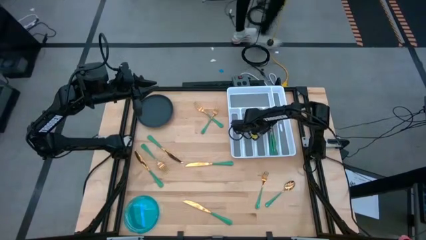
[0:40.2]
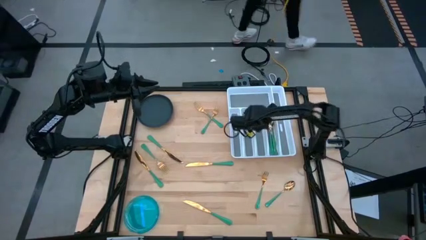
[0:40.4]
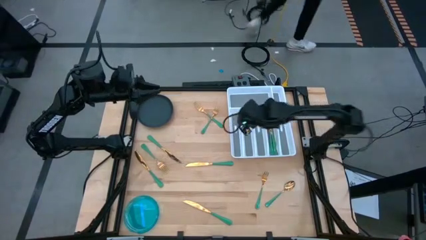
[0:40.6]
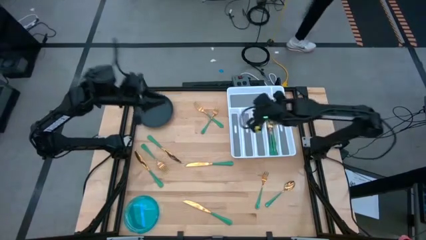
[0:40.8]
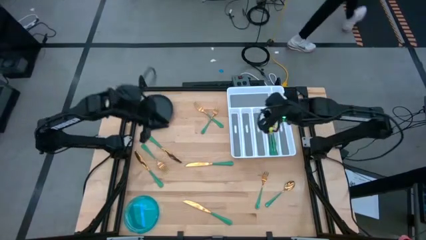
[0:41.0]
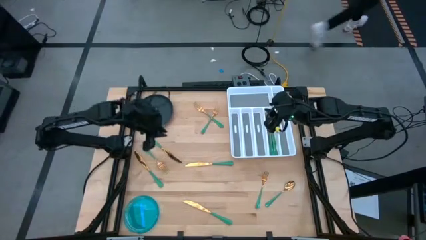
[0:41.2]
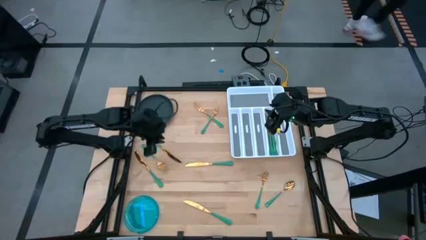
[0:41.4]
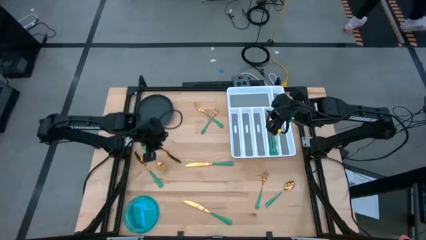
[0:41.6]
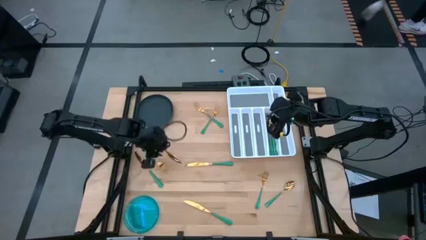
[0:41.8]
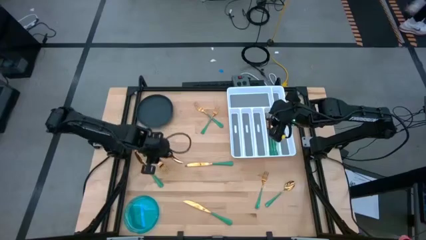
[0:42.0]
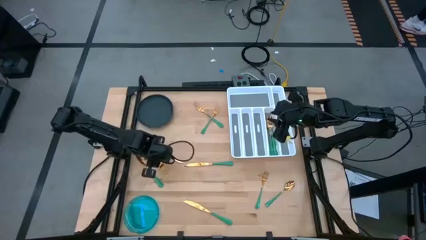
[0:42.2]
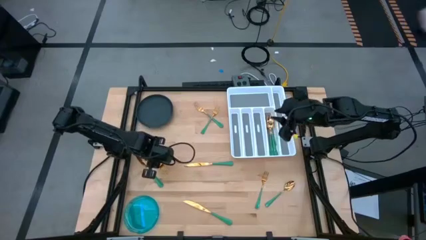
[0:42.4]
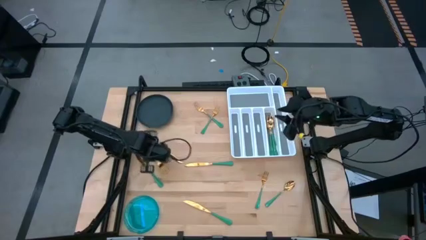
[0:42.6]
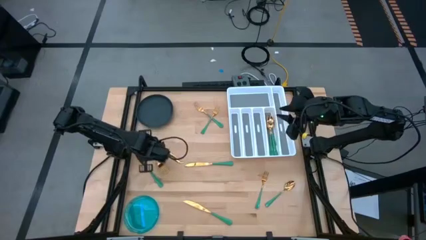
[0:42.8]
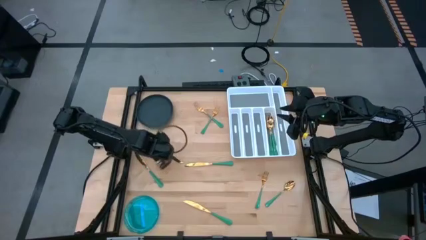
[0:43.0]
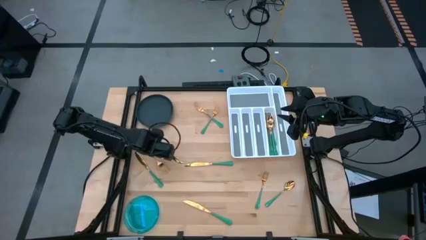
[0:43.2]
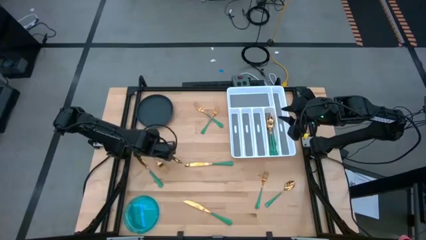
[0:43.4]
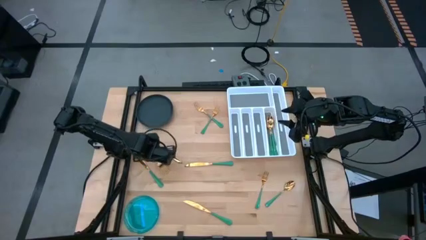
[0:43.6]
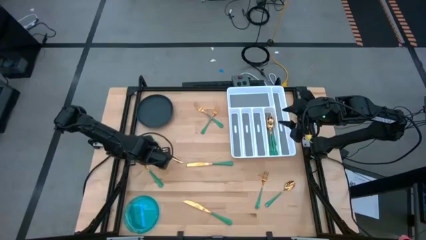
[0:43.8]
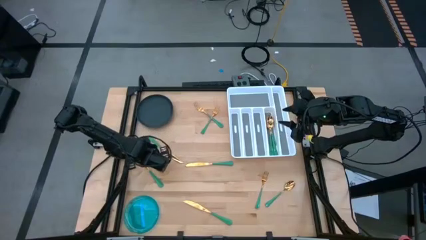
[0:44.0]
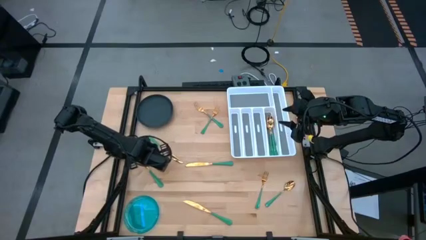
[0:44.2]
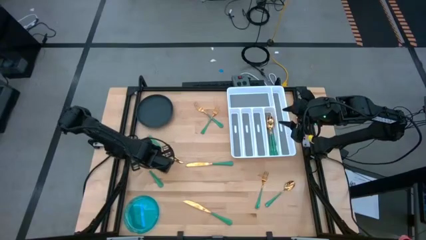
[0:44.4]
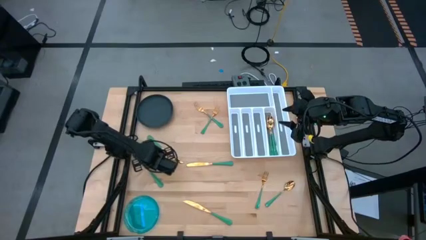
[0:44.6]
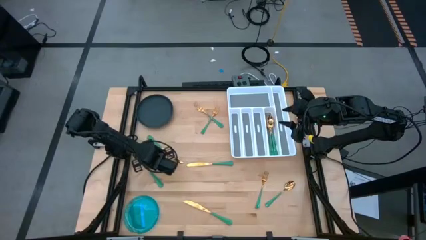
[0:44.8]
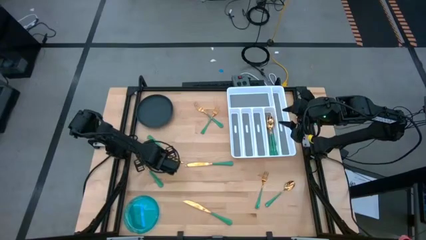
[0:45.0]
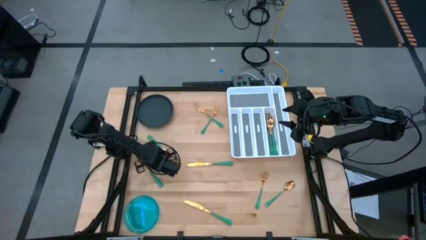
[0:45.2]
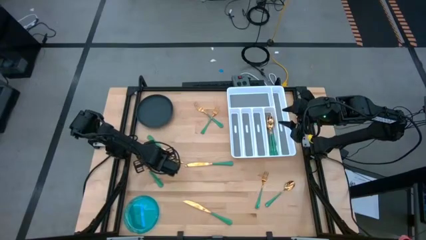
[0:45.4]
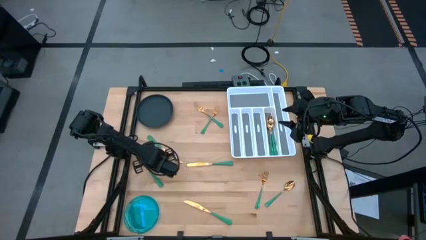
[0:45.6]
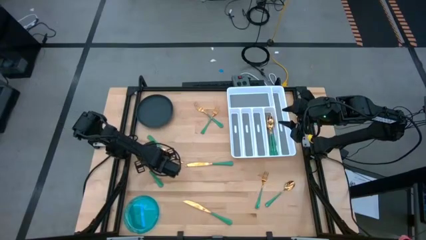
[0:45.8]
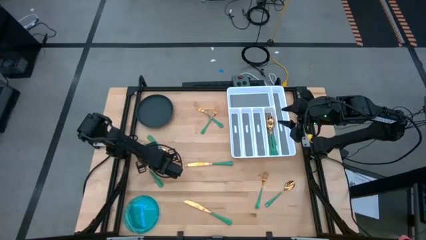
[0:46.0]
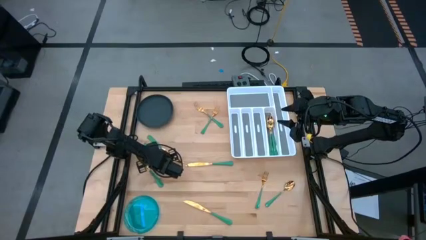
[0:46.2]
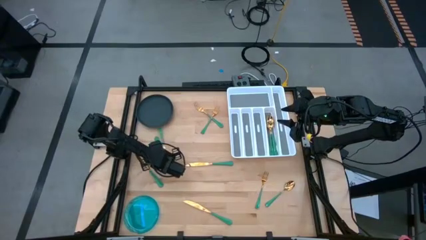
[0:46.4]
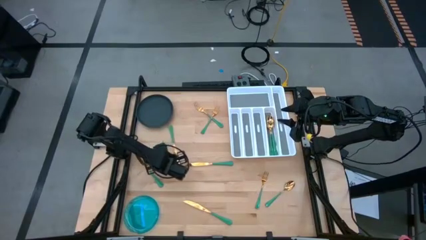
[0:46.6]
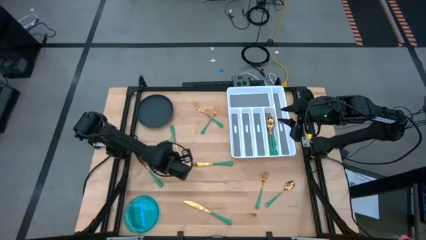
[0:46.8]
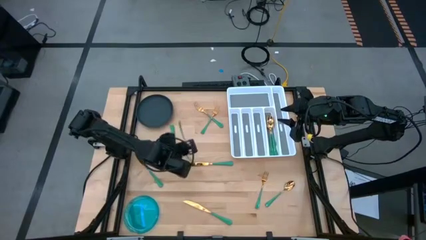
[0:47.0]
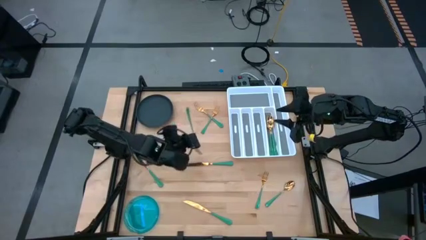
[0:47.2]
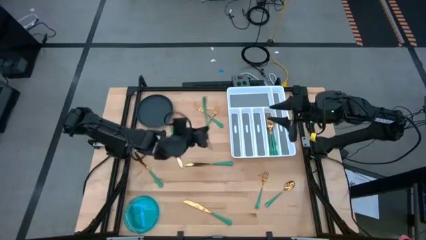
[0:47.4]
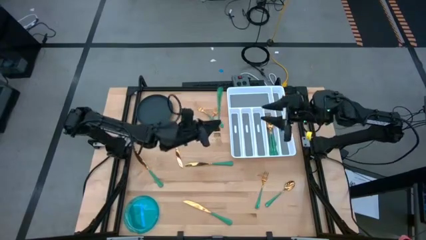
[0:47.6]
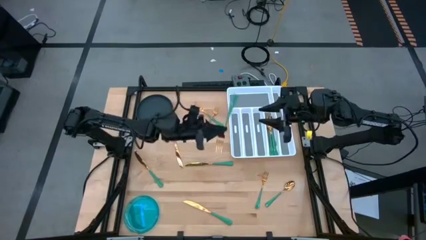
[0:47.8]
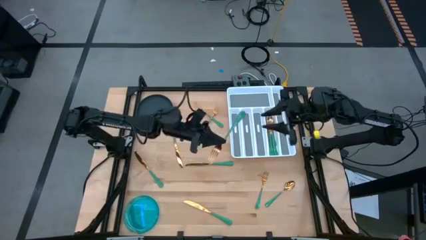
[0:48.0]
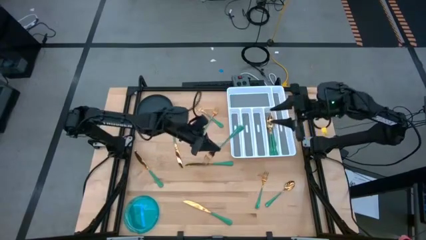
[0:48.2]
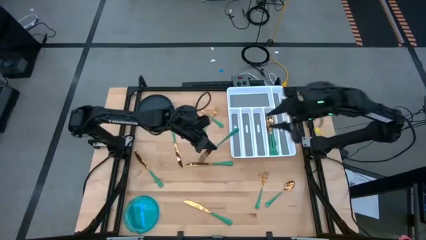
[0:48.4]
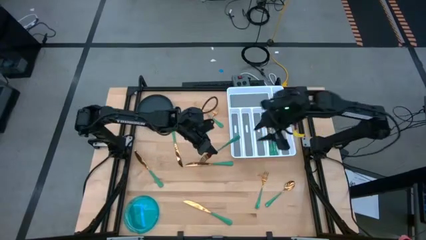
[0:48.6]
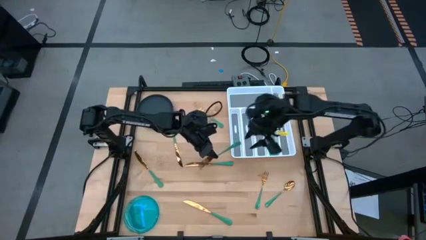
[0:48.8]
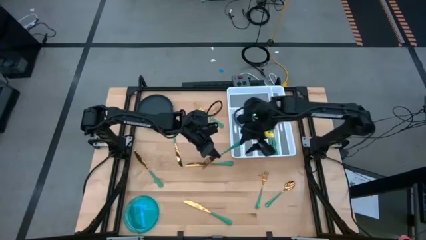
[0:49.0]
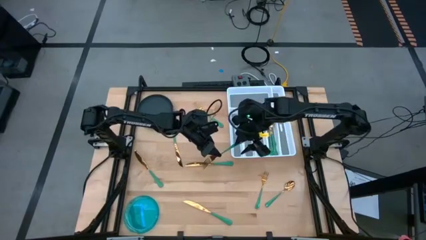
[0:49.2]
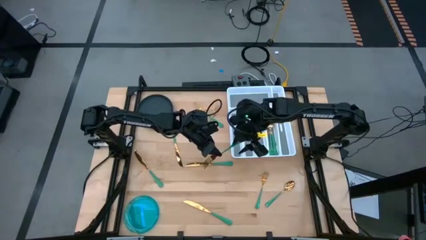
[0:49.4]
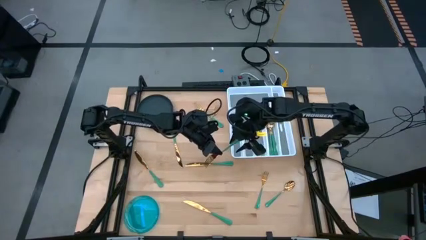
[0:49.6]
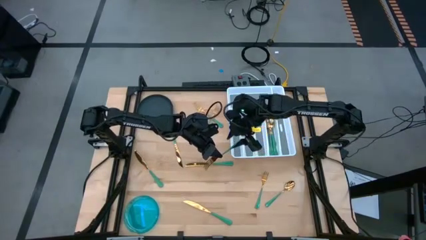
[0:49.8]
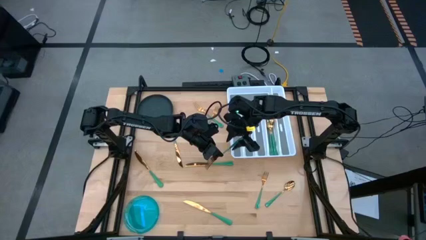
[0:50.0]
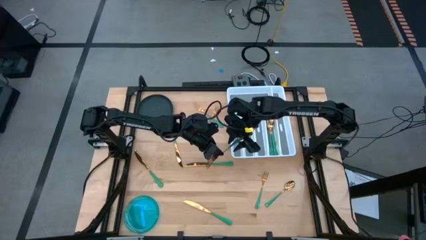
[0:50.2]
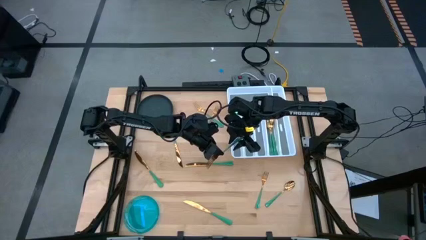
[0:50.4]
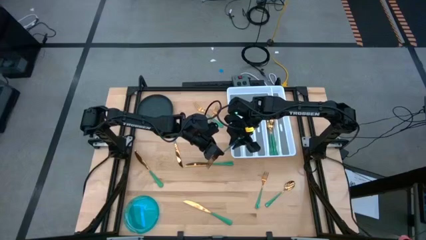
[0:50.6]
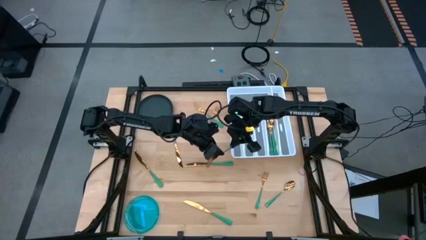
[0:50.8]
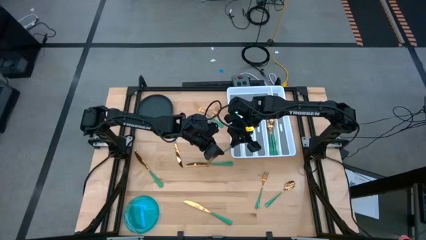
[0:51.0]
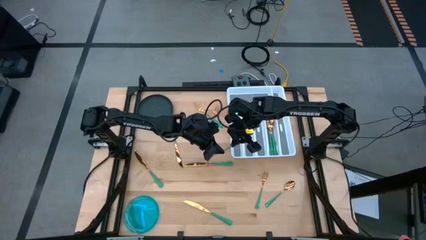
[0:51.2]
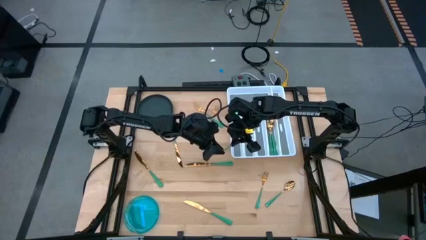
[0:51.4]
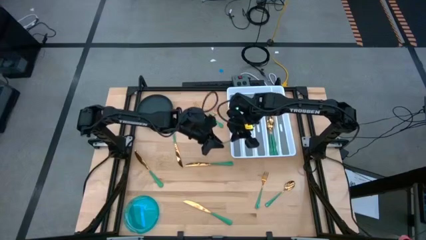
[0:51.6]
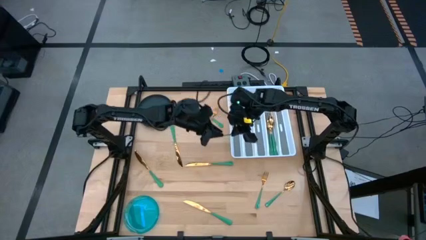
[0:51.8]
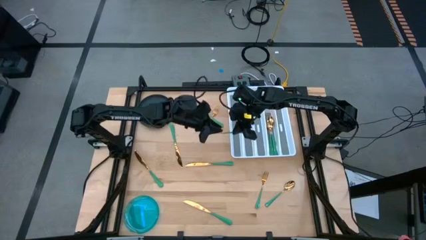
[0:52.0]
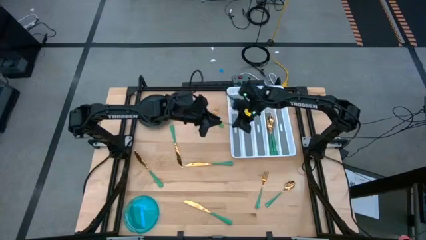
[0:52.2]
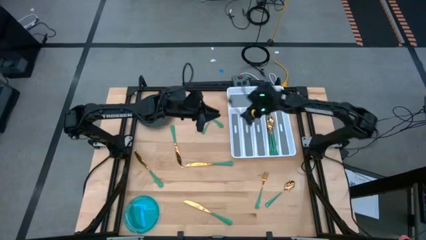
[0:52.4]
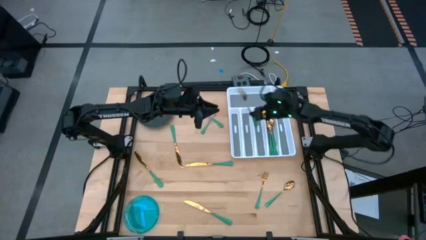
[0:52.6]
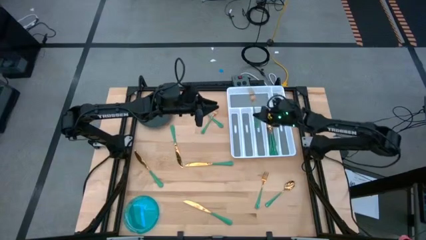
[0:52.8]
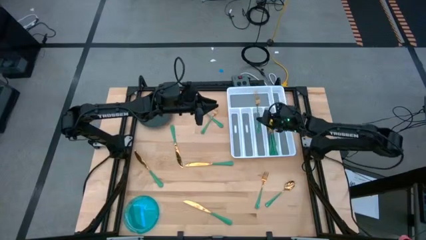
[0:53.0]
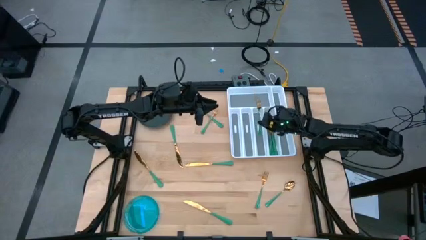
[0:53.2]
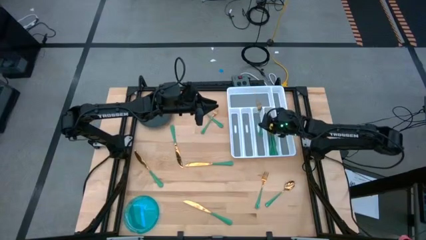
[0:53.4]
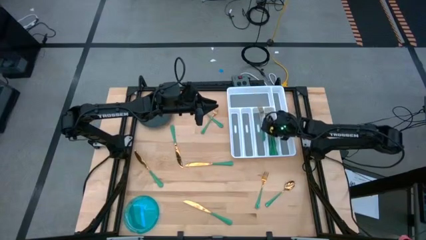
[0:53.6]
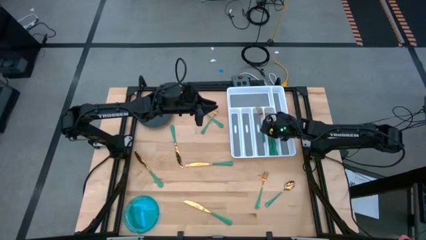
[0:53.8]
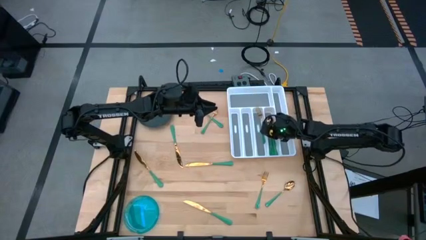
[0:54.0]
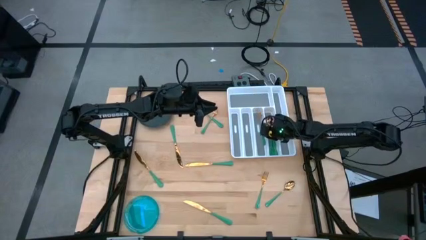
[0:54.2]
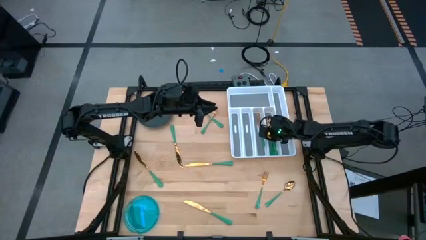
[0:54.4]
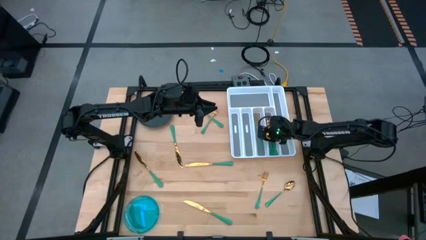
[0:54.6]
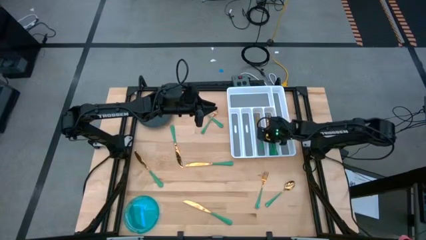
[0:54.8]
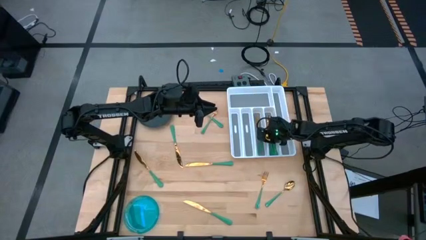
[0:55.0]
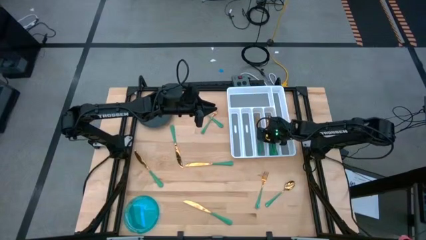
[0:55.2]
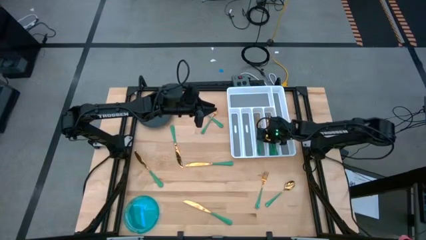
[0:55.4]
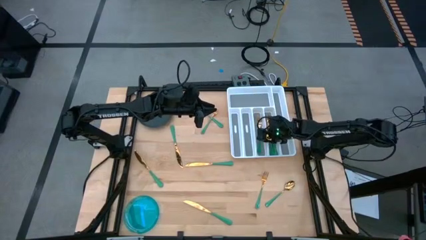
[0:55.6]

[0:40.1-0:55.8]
Task: Sort silverware
Put the green fork into the white silverware organizer

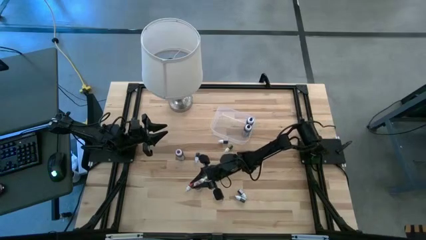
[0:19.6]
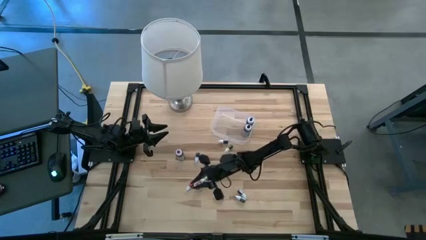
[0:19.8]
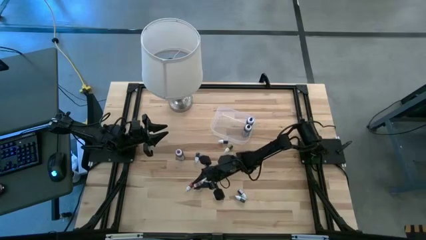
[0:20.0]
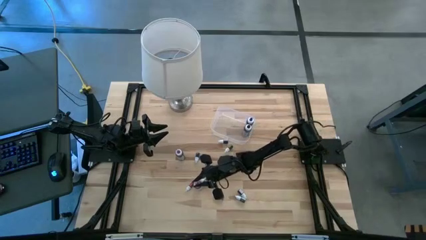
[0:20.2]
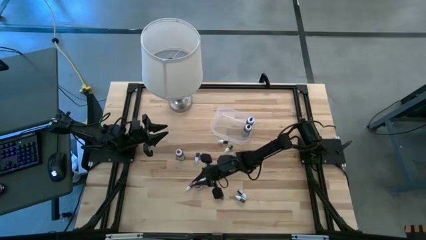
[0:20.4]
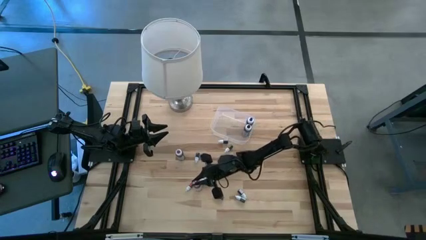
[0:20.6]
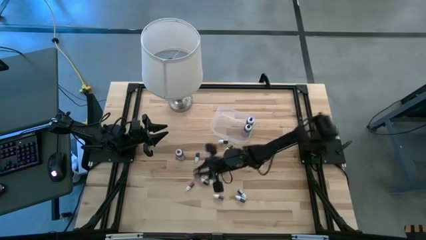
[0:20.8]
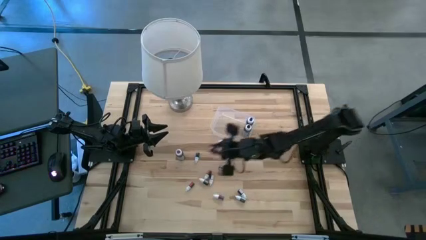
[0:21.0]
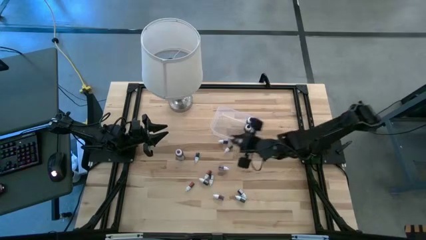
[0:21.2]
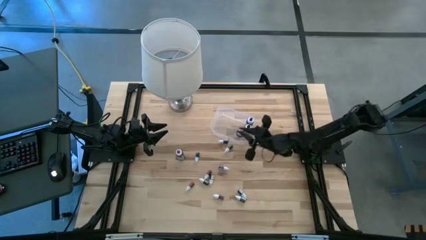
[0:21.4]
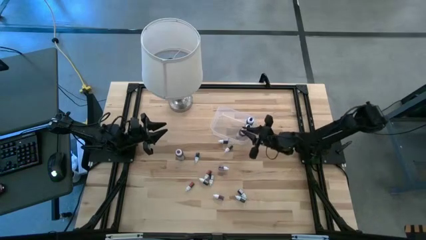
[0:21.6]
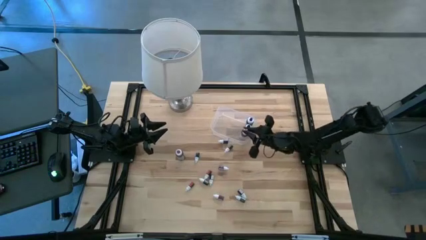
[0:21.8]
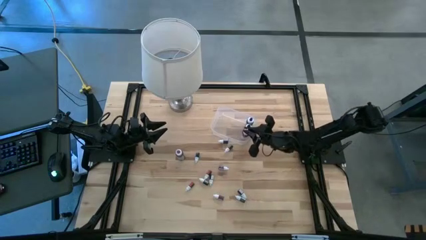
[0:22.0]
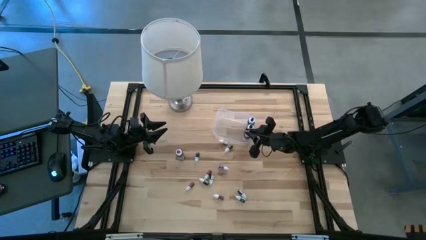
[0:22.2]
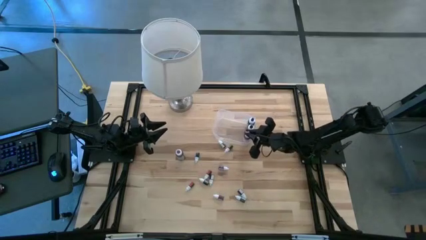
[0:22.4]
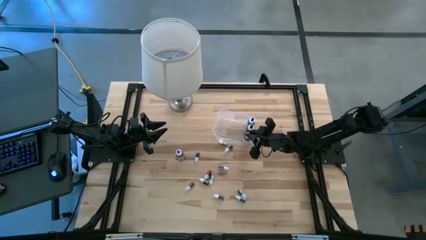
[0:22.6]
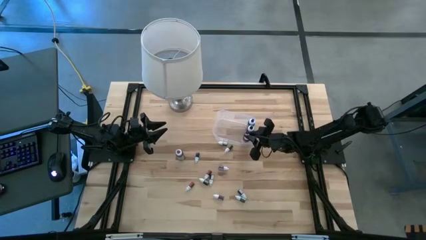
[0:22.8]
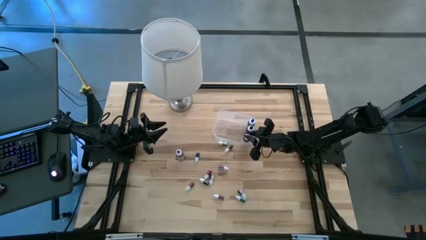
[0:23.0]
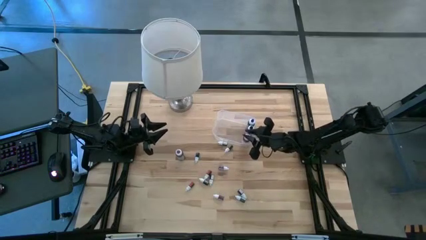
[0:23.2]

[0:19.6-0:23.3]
Task: Pick & Place food coloring
Put the large red food coloring bottle into the transparent bin
